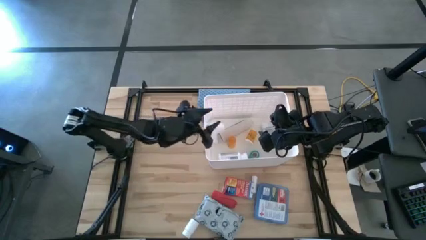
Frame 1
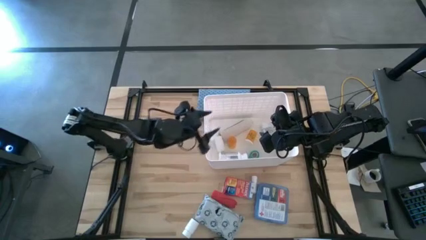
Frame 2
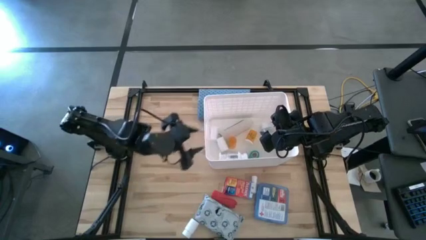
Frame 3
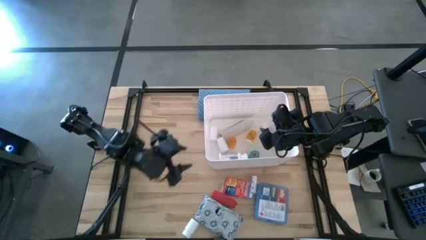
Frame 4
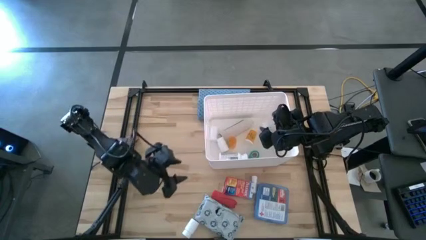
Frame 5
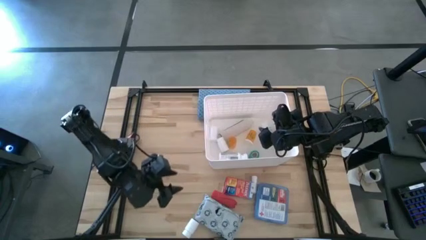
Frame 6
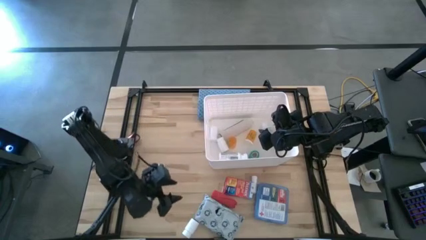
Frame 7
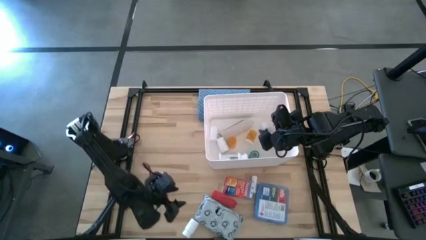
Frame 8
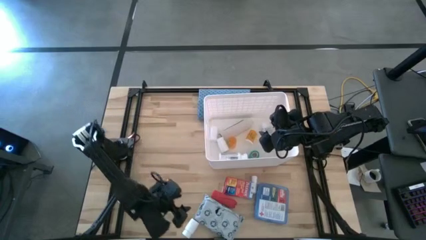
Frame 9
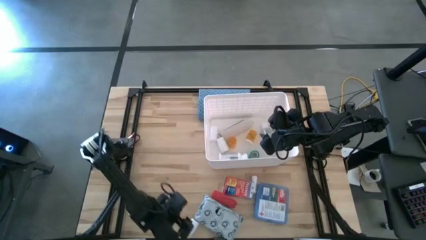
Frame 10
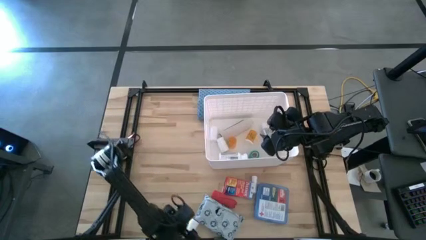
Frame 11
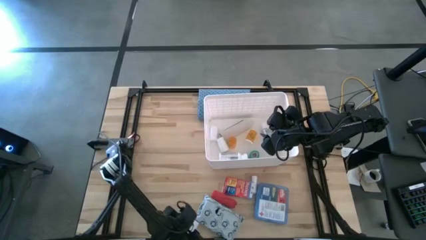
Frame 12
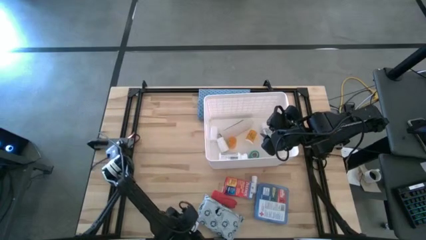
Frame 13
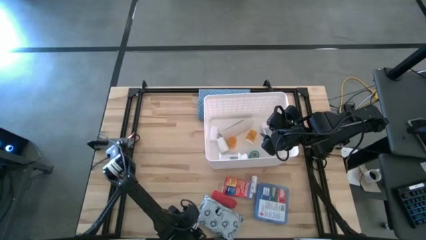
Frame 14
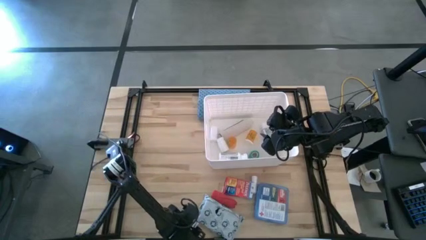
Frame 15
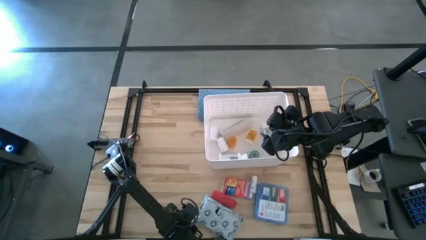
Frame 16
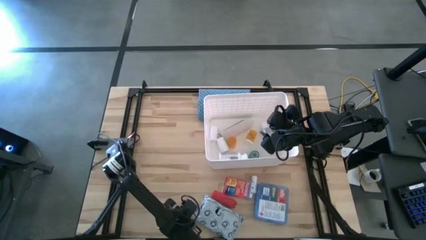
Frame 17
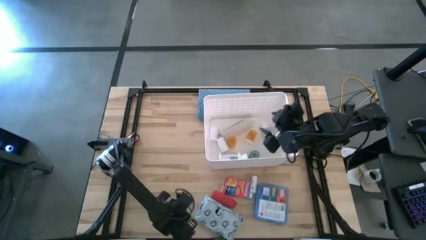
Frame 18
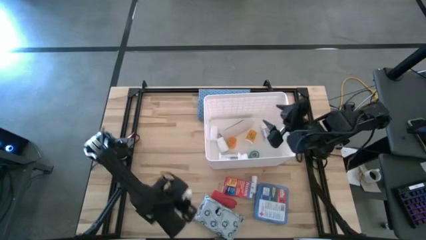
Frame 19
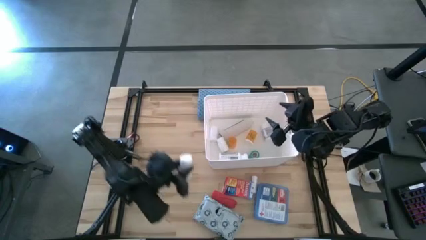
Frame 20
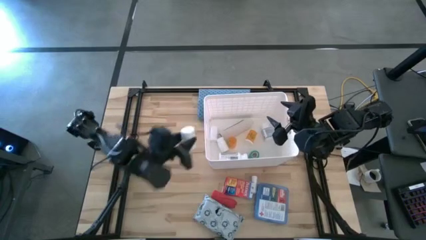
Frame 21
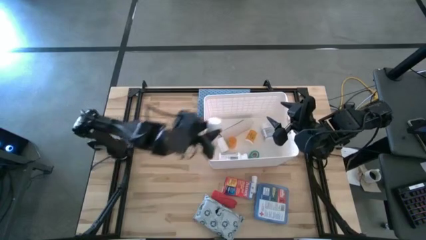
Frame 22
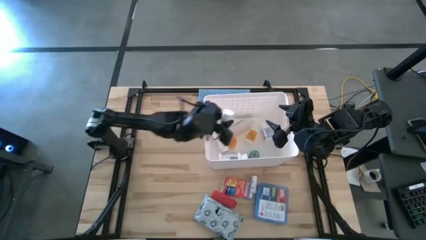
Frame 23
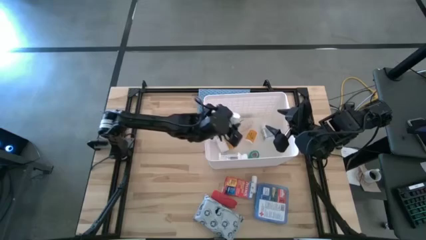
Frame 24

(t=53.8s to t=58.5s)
Task: Pick & place medical supplies in basket/bin
Put the white medicine bottle into the white bin

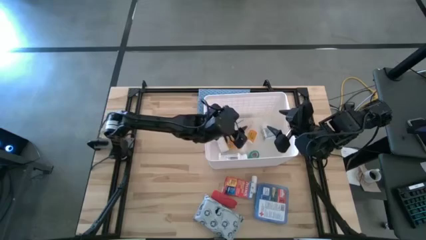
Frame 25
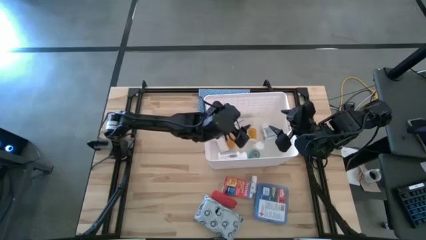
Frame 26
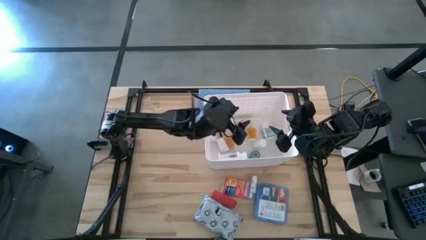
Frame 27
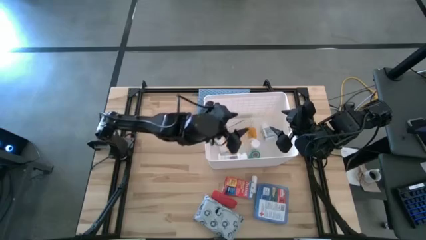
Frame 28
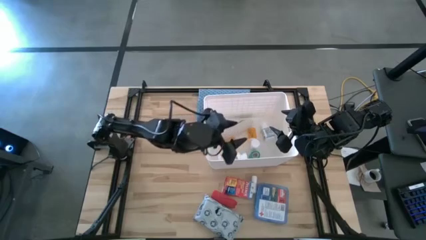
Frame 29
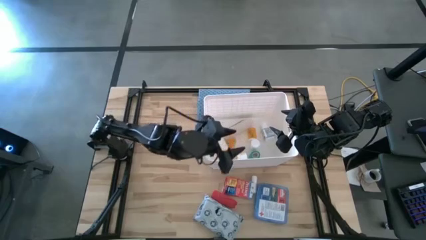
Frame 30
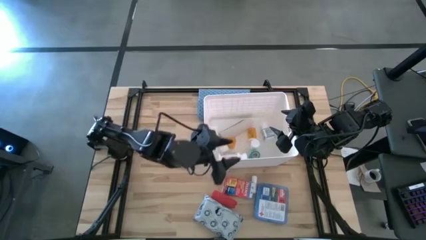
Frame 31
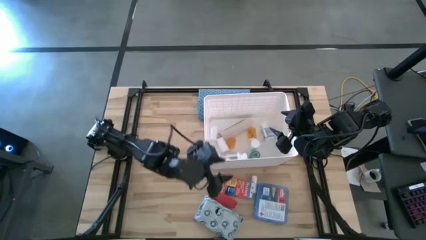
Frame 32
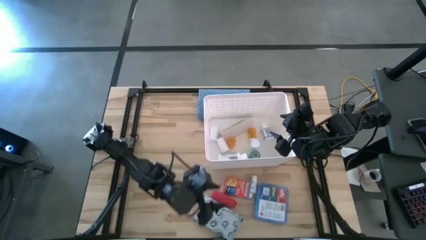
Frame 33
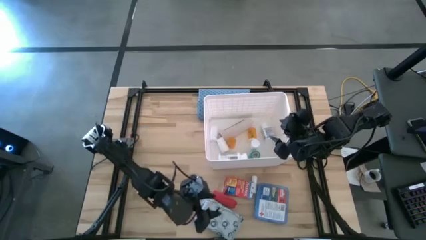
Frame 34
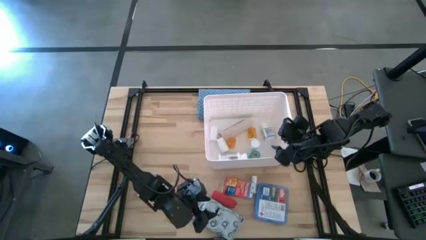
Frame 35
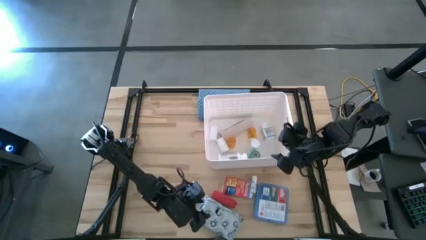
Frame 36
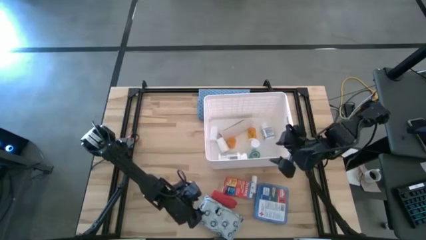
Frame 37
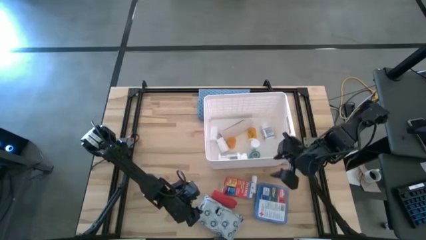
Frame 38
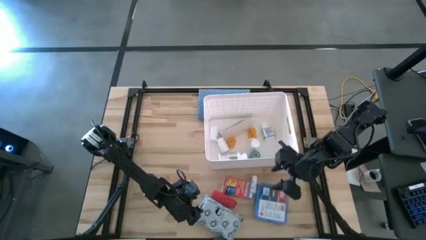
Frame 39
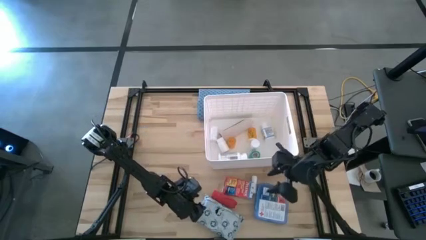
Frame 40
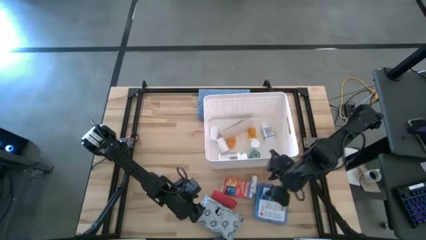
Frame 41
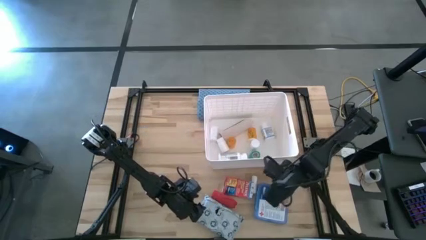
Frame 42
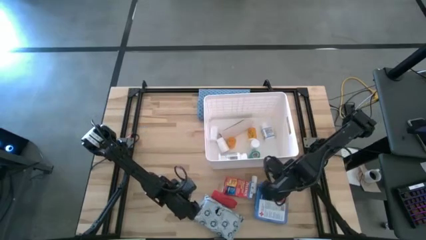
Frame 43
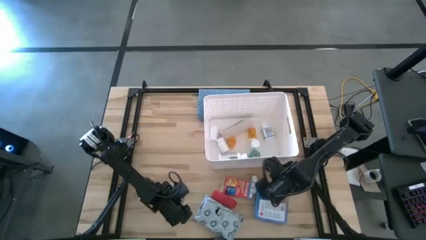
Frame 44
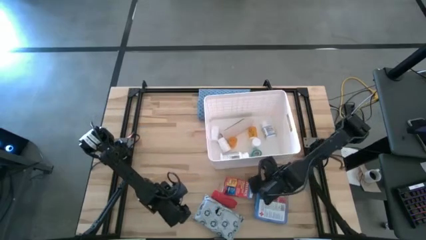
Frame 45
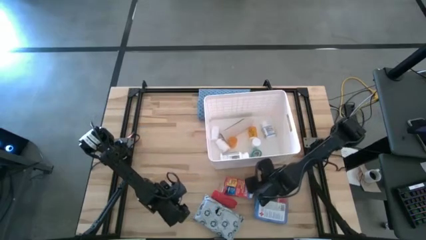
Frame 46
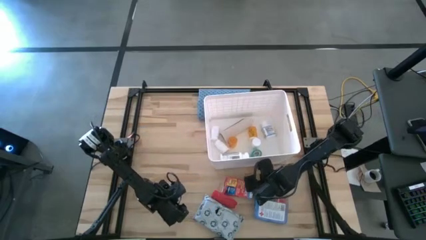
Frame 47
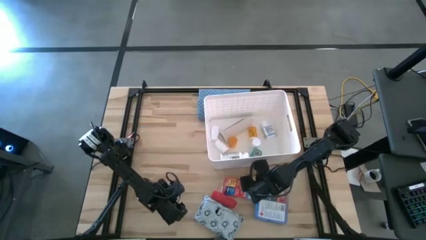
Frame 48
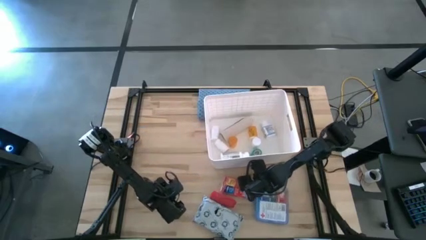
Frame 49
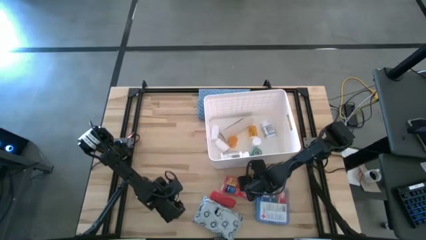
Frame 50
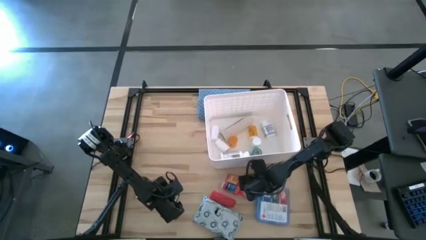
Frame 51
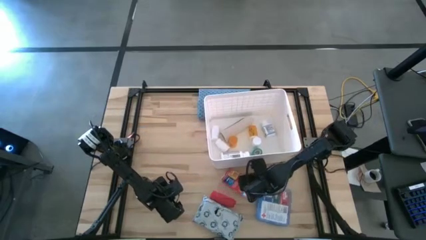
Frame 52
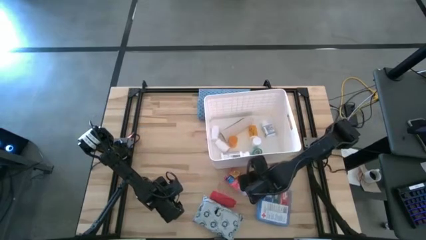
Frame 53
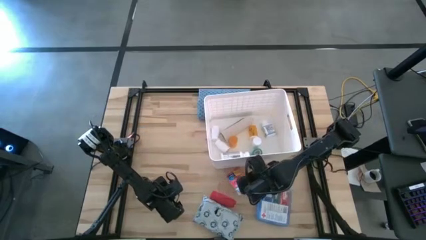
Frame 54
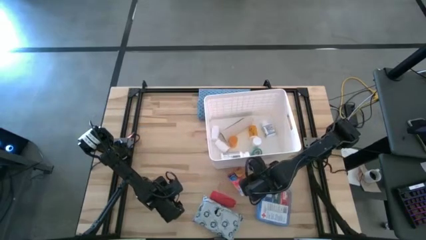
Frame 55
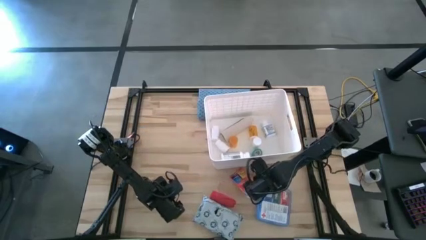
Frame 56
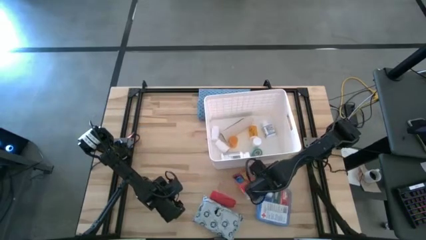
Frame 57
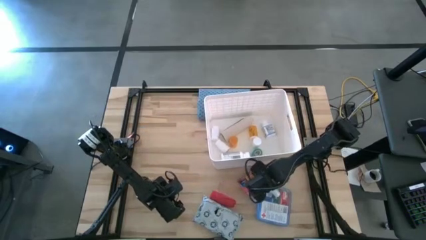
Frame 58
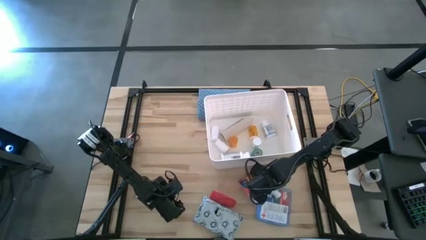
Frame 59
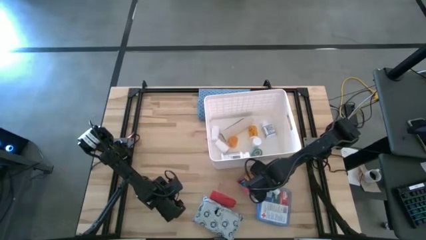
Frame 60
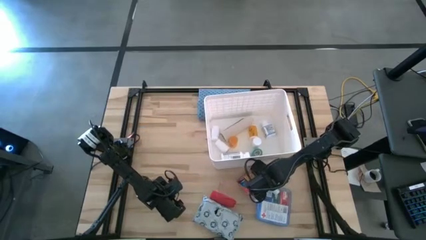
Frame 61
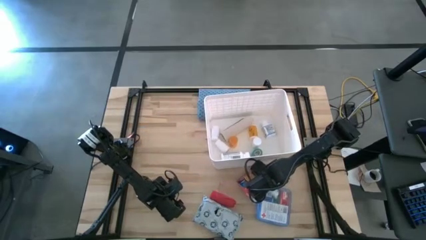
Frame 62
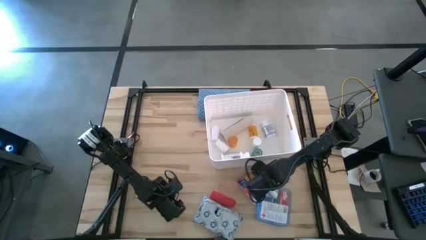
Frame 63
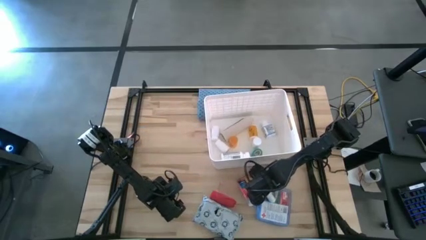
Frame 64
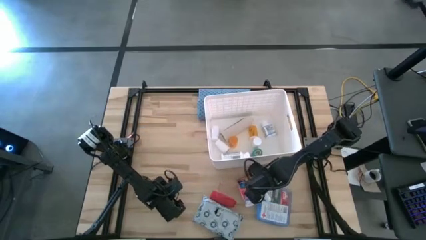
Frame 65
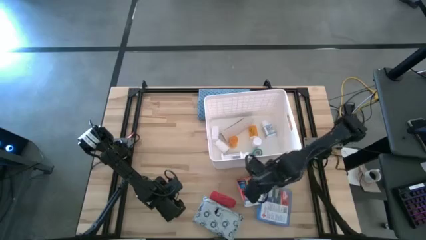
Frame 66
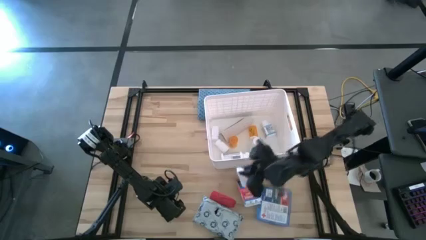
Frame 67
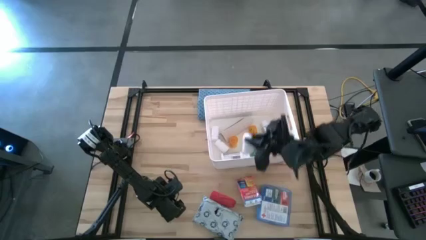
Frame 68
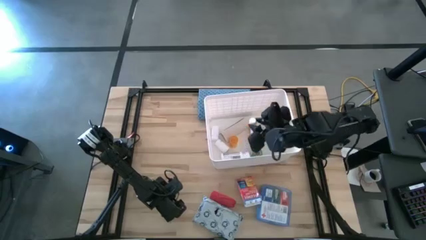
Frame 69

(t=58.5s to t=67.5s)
Put the white rolled gauze into the white bin

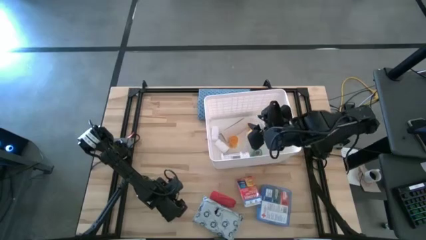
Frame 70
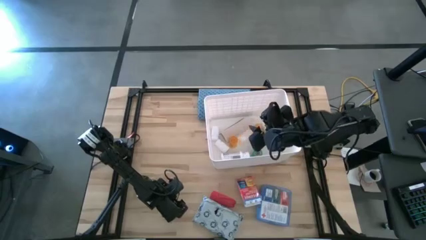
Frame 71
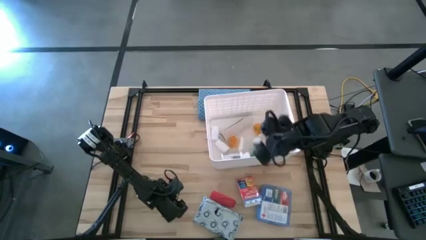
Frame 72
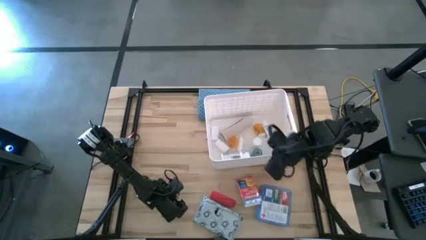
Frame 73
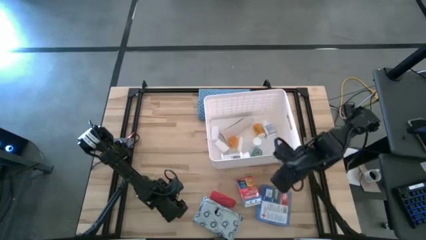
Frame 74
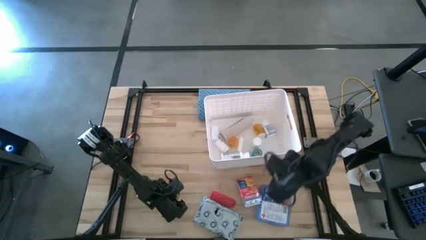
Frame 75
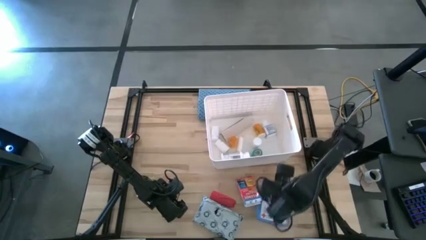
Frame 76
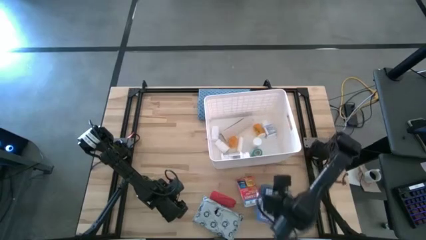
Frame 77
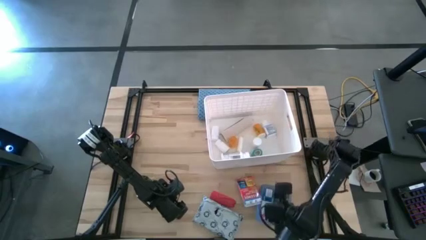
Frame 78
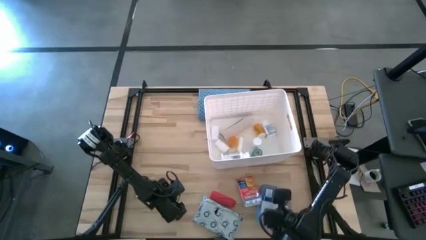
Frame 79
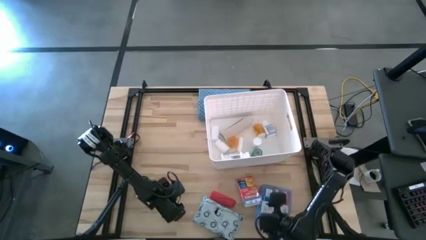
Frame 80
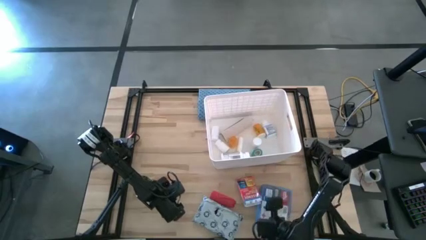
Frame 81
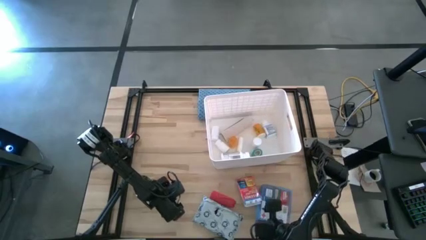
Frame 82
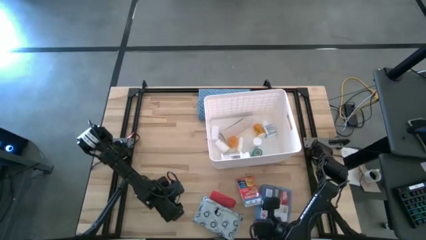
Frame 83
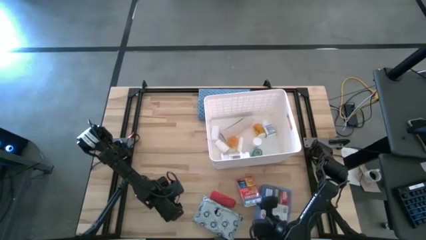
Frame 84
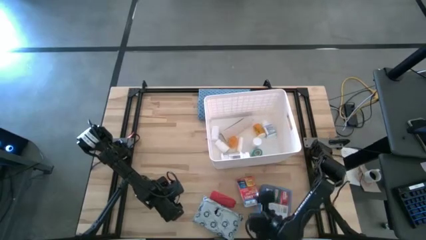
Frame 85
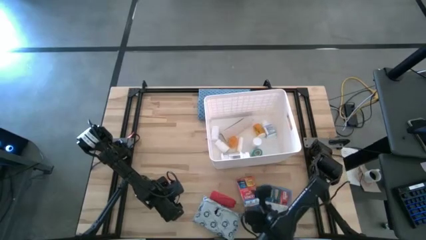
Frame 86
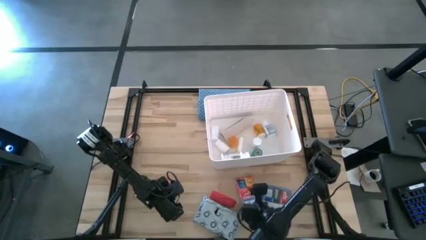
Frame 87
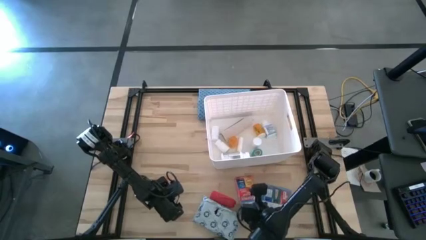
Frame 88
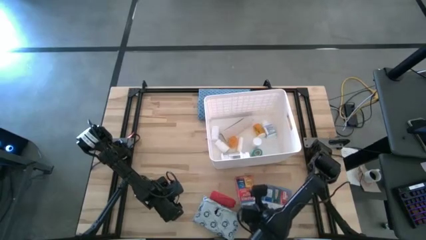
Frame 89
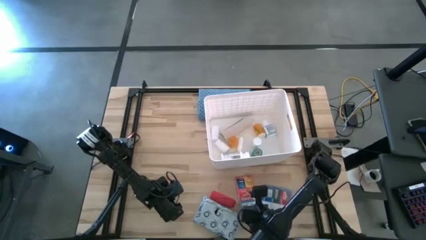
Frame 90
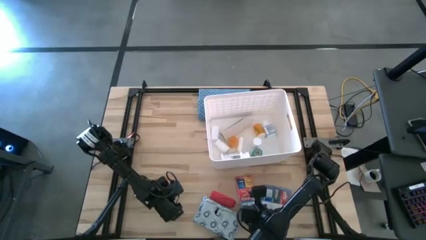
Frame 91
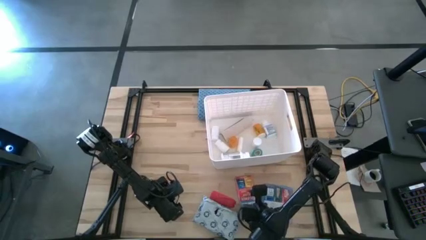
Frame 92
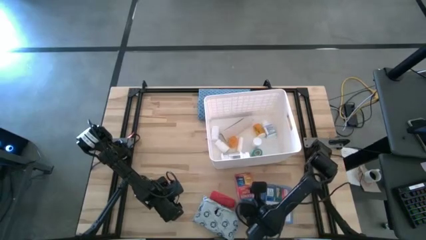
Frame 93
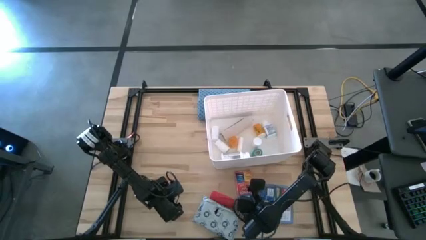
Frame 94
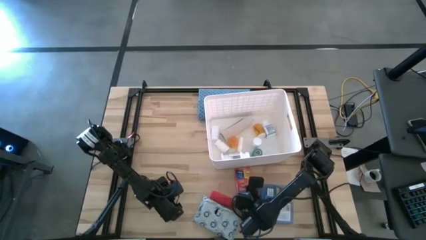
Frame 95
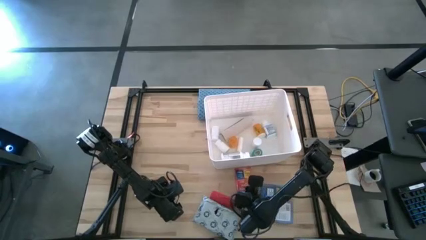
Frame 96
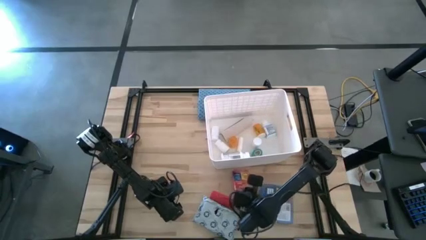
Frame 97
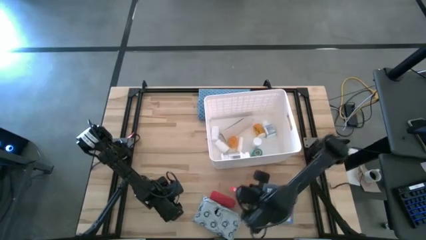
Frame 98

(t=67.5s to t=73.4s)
Put the red medicine box into the white bin
